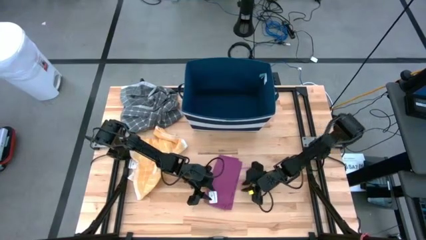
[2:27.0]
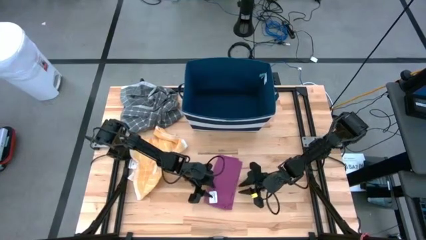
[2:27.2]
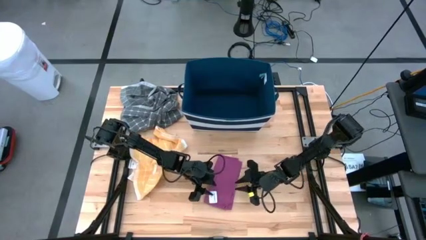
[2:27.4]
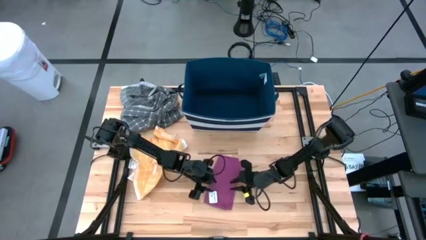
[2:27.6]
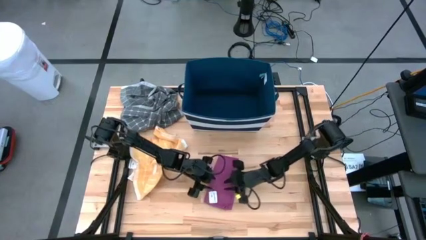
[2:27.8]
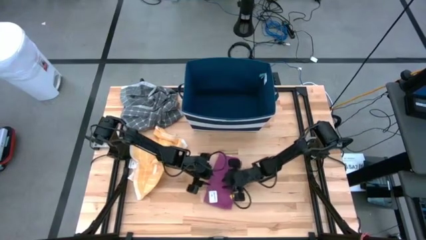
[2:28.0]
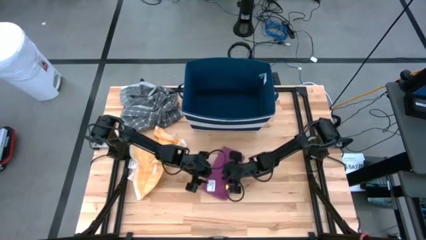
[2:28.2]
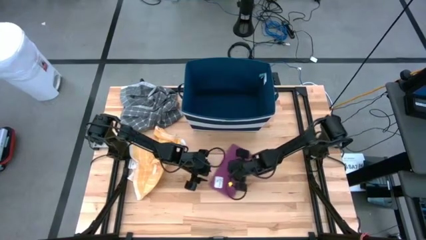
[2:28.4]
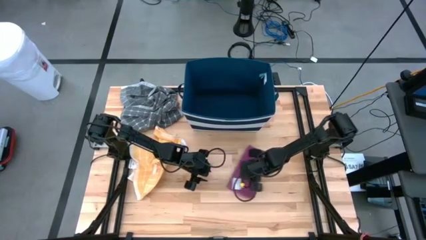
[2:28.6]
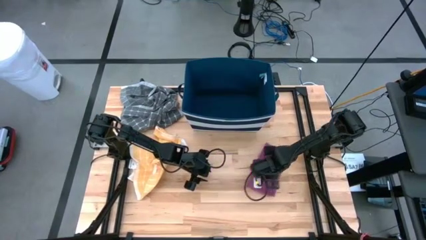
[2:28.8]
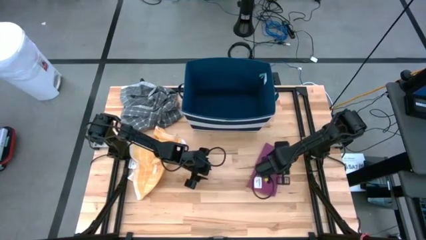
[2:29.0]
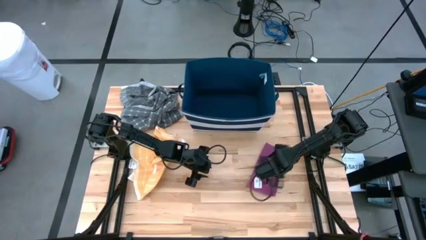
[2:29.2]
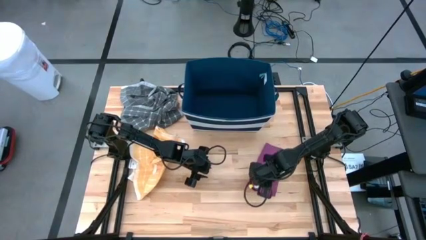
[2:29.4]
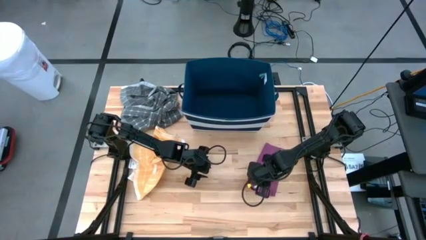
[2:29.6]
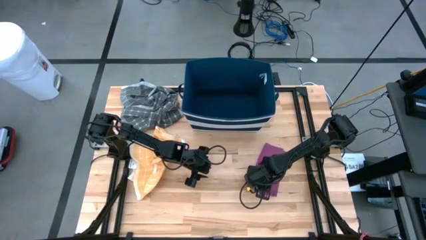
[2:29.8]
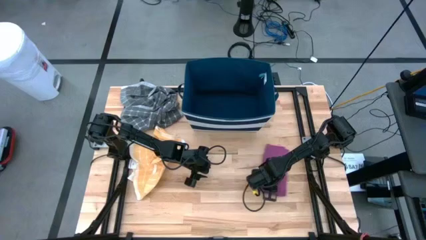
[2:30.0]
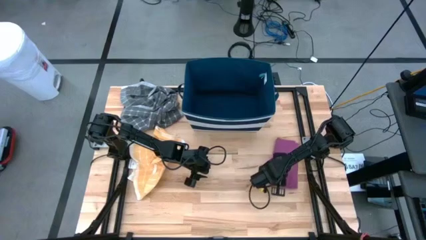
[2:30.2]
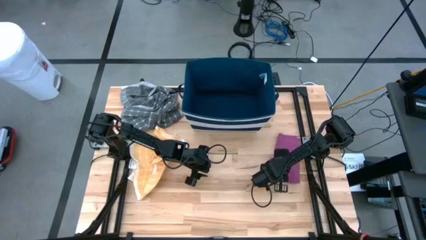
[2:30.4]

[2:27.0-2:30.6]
Task: Fold towel
Move the purple towel to the right of the table

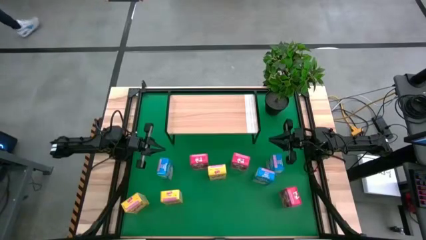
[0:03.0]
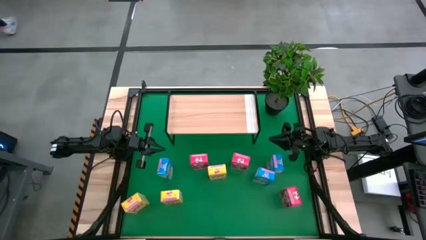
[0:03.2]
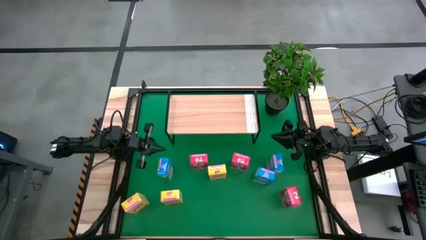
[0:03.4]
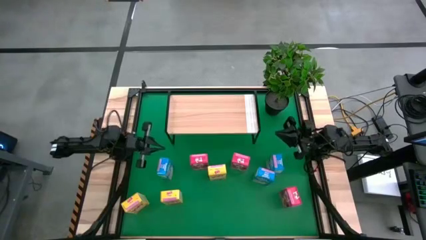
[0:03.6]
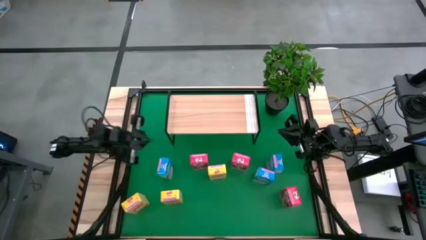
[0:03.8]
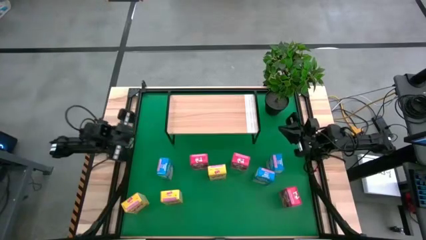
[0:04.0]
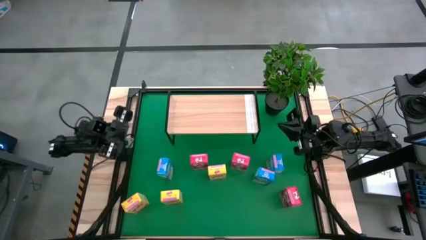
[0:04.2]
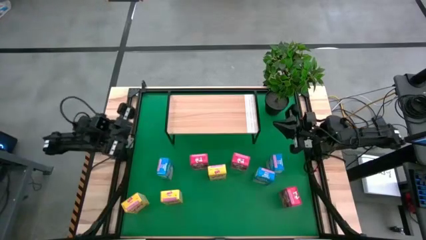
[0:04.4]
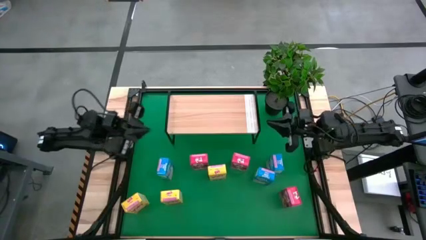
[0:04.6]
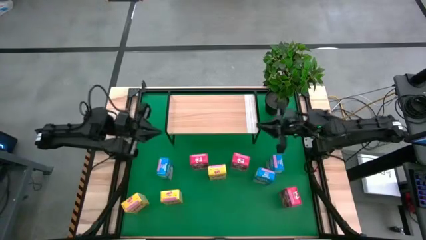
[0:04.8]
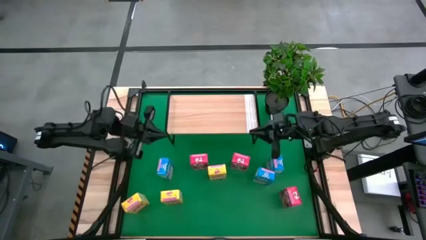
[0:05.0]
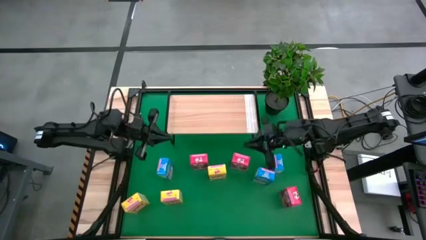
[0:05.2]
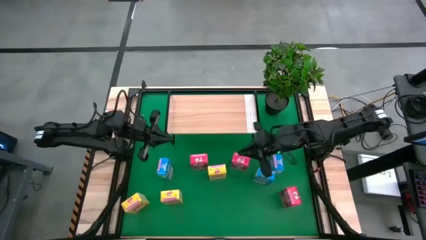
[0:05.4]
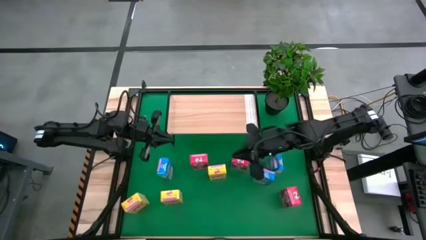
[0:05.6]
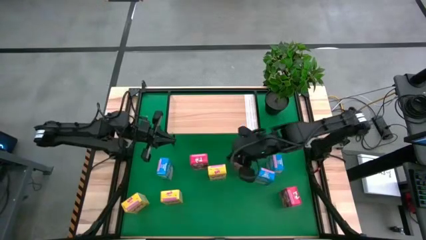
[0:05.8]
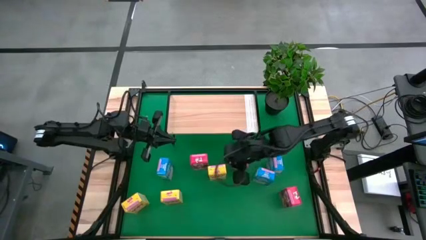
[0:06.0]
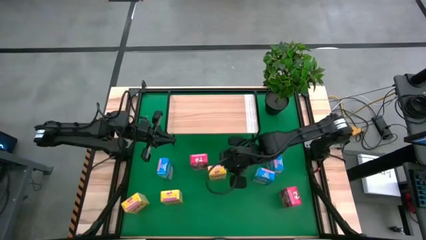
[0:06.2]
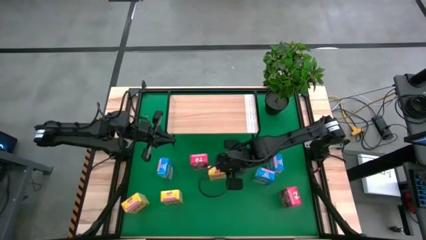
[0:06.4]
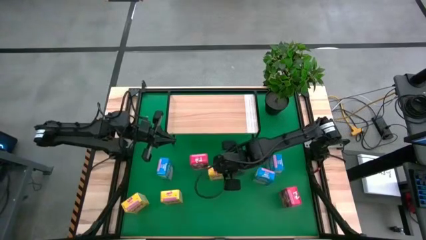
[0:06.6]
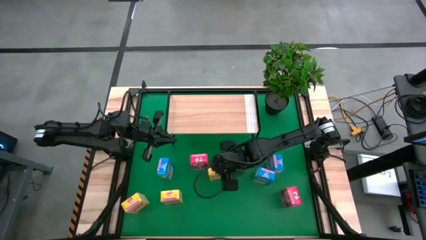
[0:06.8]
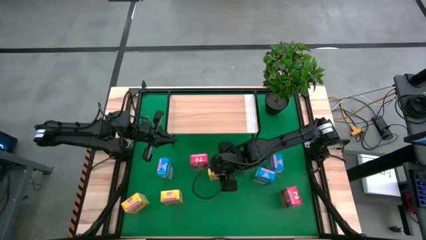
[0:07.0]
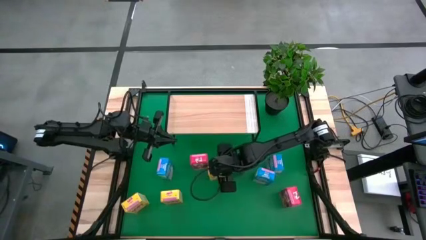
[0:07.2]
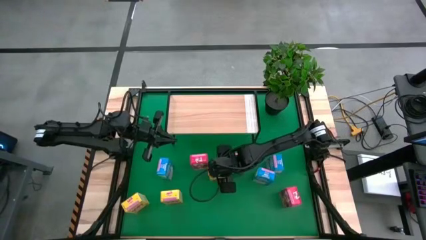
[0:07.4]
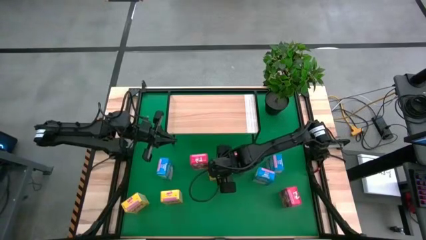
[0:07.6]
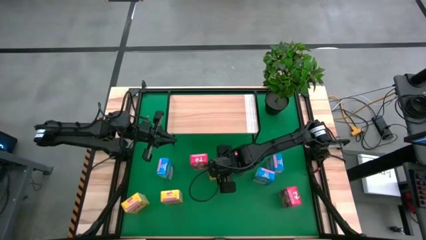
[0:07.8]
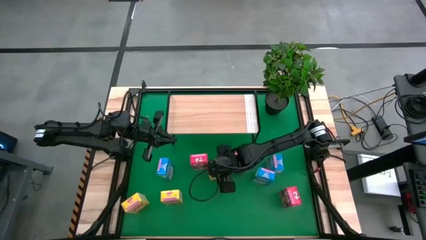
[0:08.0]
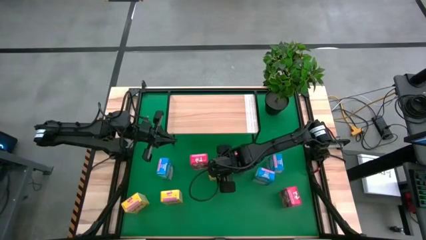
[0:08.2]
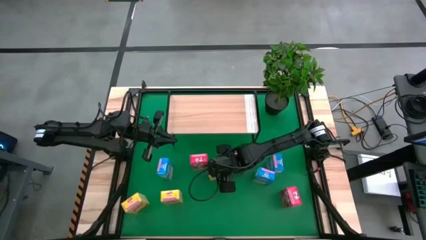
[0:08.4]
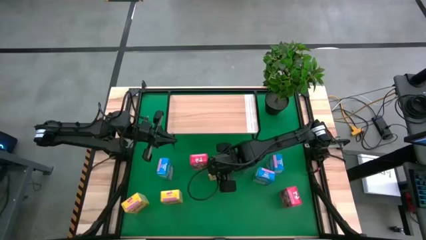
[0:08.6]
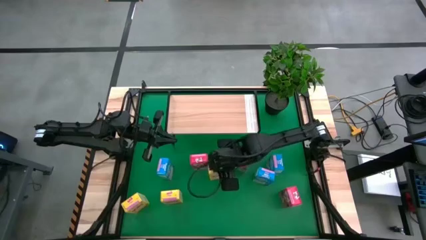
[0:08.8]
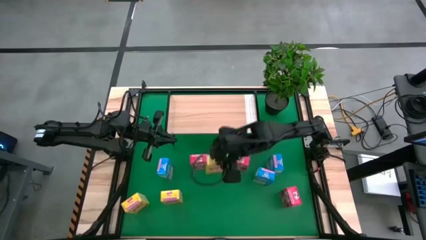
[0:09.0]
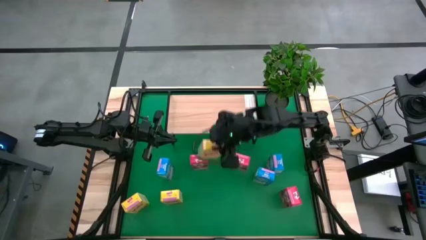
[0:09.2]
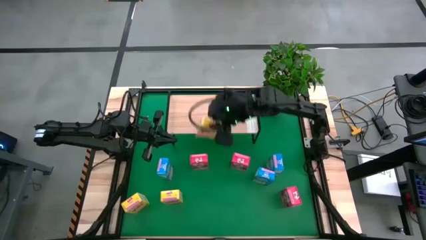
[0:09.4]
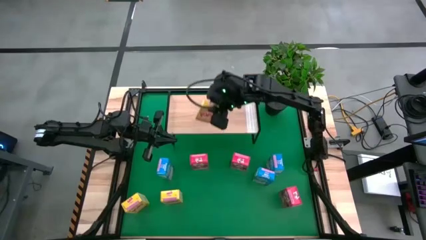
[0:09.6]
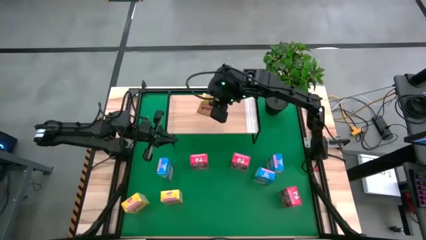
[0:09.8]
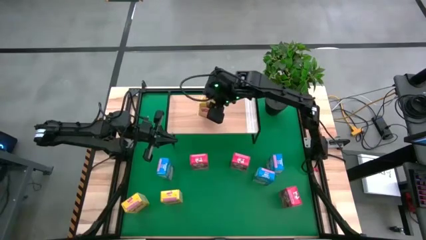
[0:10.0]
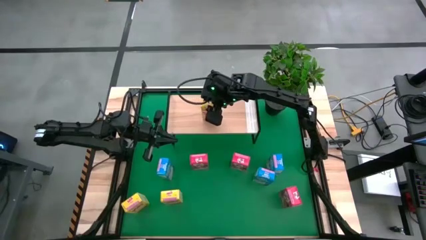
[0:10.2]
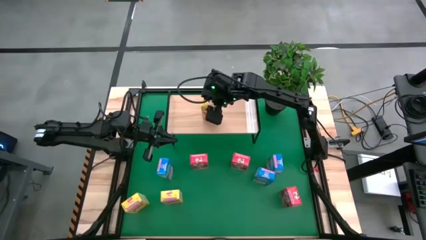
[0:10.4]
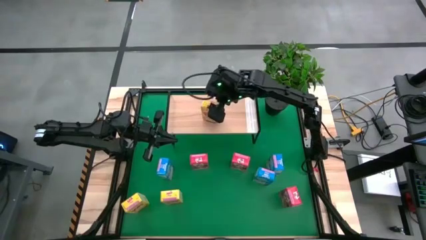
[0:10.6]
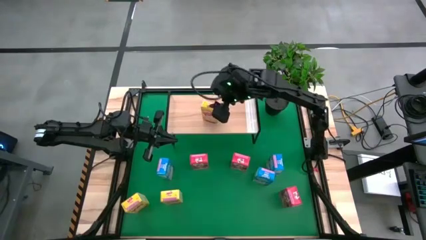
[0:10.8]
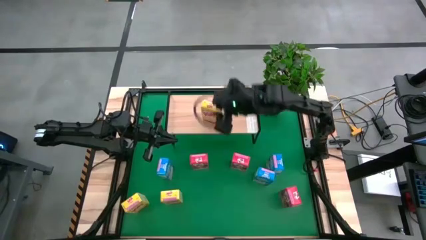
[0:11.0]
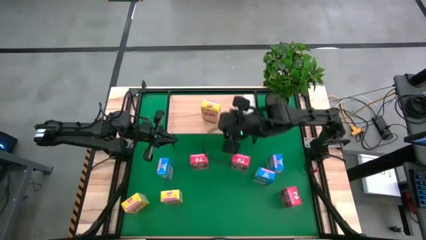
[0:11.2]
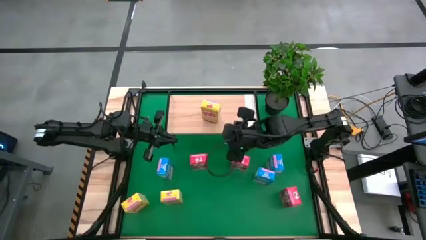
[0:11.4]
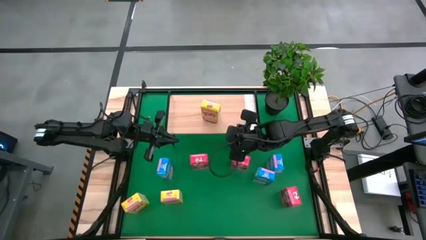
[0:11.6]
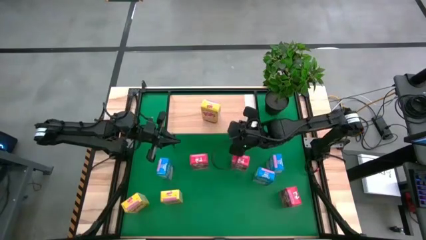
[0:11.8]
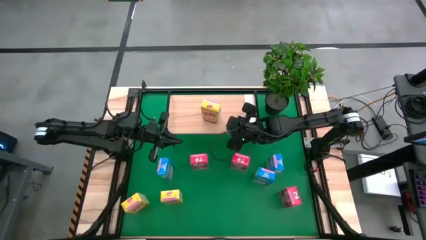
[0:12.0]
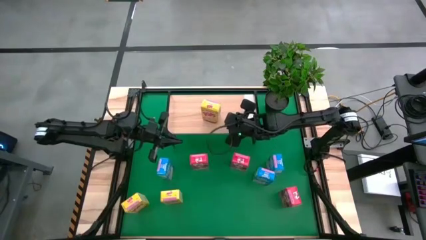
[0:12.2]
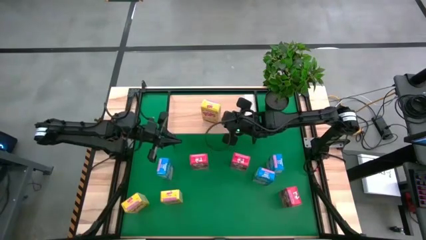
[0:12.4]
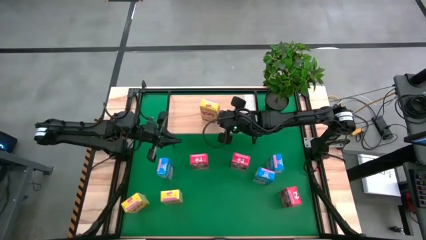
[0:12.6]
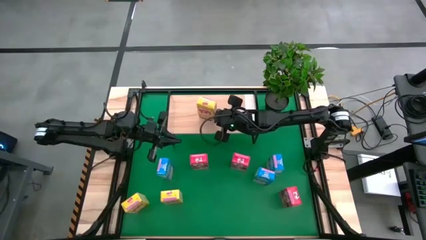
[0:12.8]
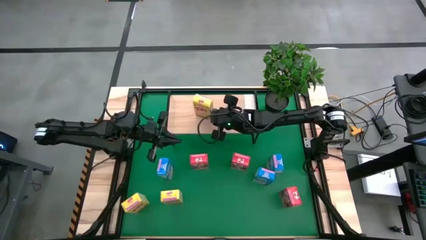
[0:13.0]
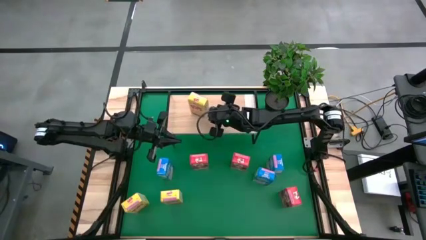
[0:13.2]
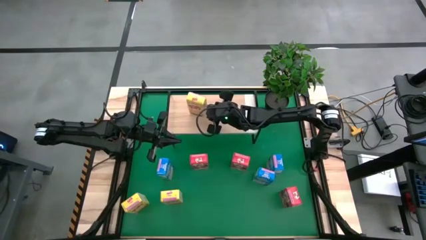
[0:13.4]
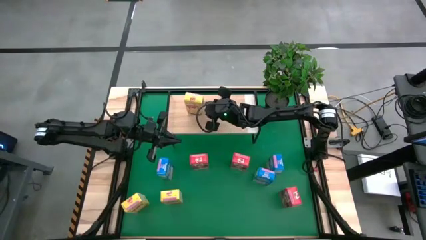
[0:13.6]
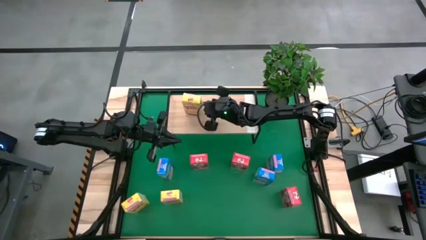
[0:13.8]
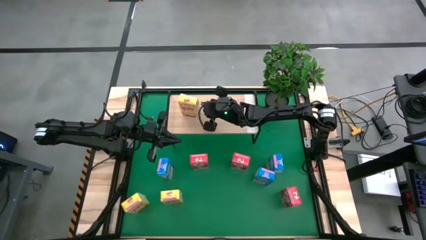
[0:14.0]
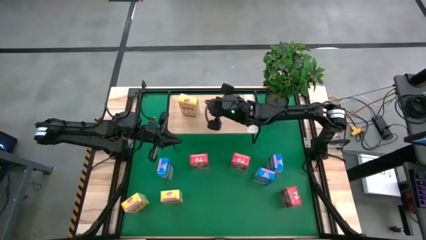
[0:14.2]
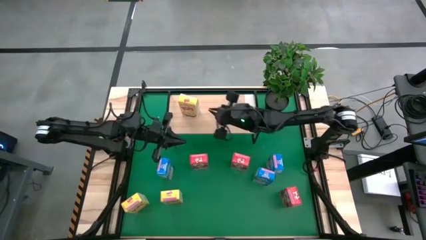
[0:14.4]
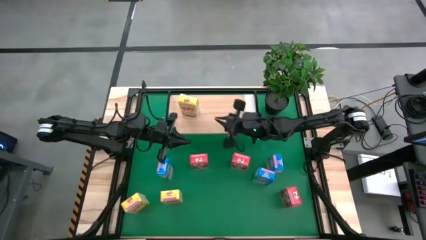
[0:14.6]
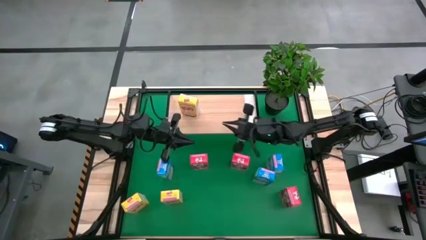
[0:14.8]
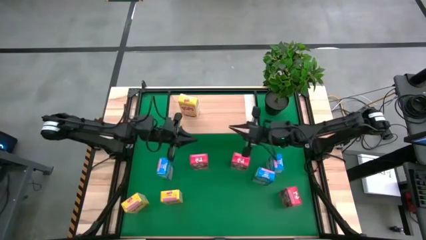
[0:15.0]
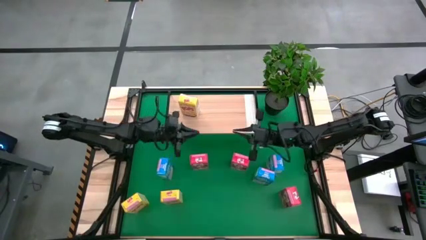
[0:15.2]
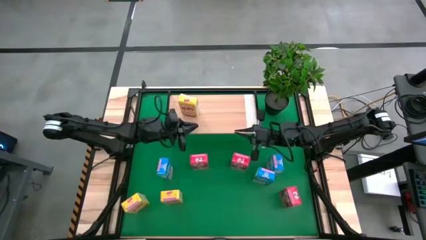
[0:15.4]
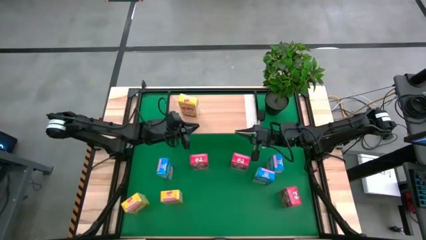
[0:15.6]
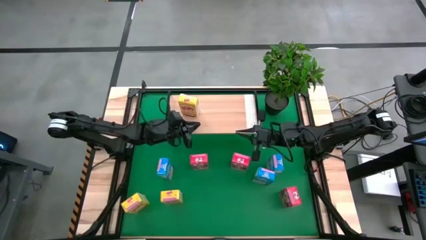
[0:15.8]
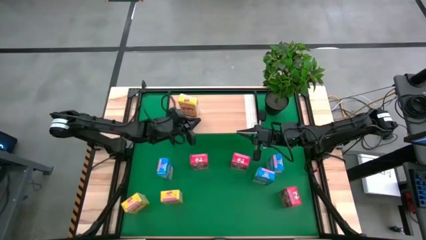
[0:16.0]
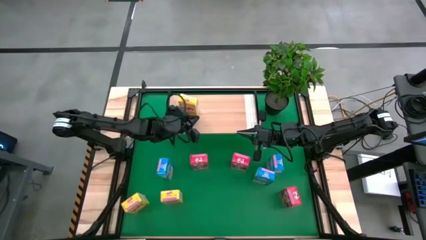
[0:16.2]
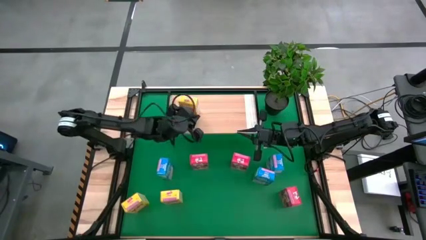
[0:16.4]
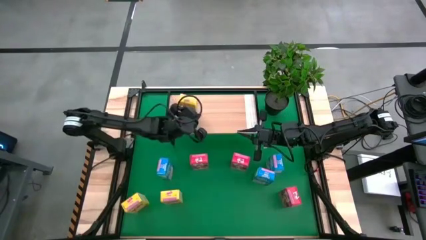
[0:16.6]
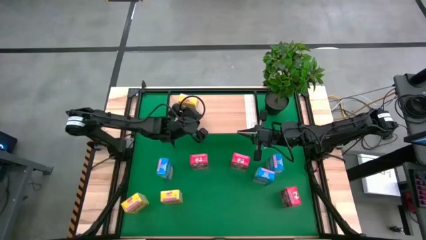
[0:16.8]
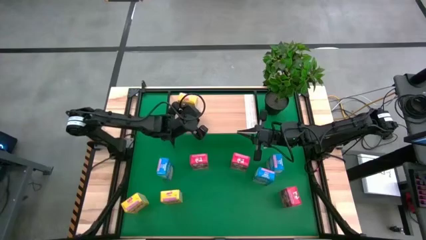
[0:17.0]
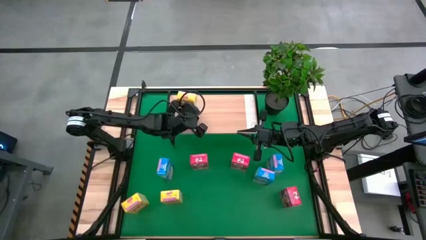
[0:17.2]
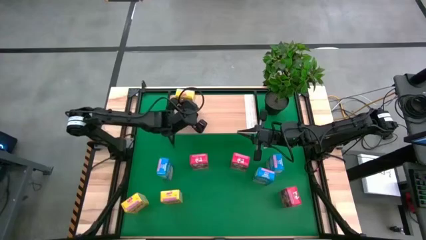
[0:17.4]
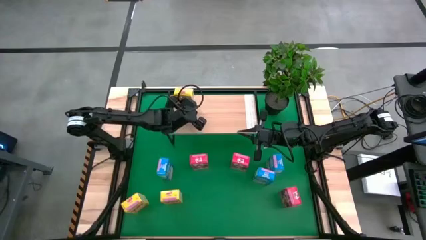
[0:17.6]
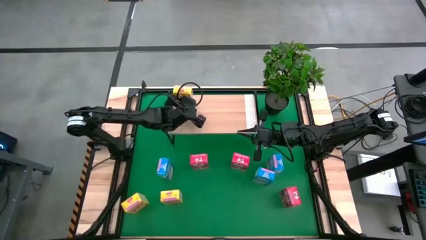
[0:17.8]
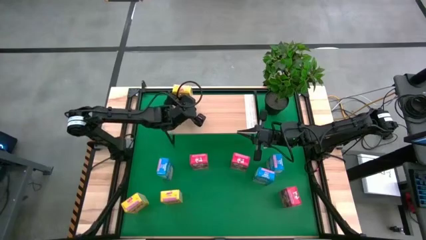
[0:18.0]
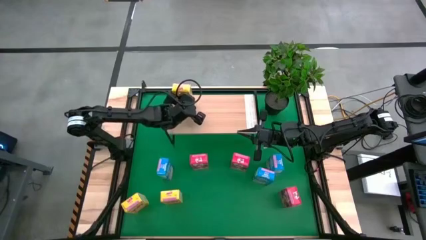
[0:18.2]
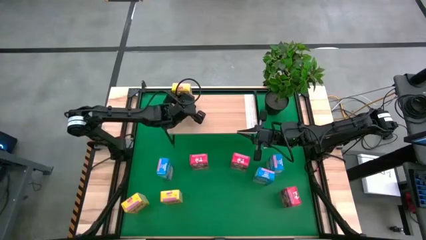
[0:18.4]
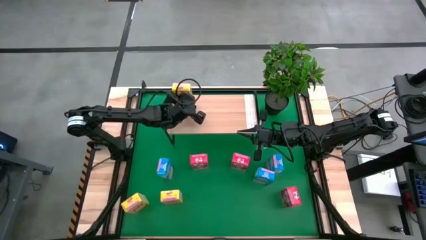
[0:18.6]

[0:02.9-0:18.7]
Task: Stack cereal on shelf
Put the top yellow cereal box on the shelf
